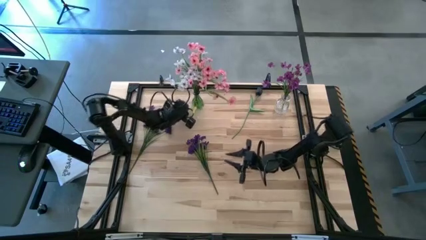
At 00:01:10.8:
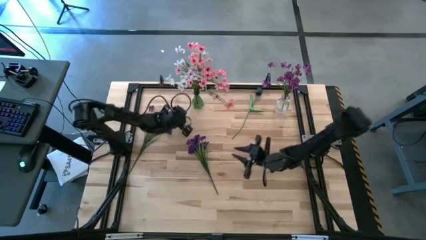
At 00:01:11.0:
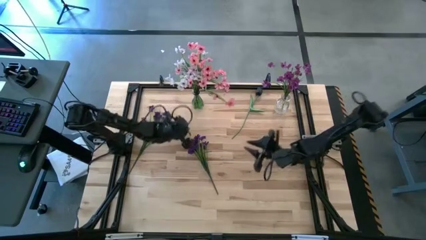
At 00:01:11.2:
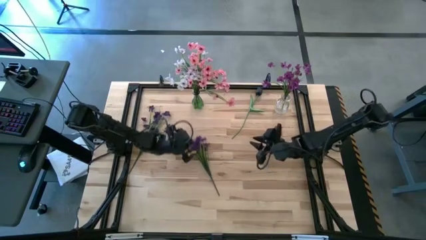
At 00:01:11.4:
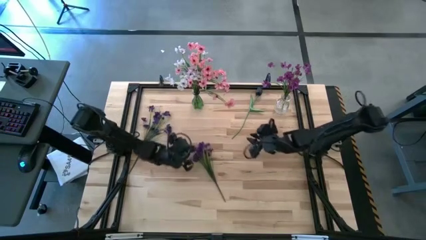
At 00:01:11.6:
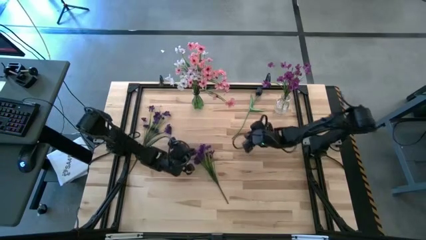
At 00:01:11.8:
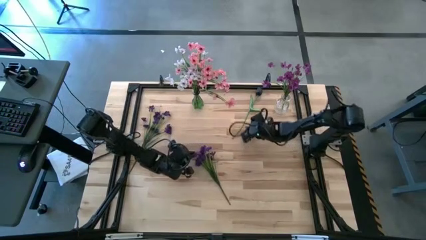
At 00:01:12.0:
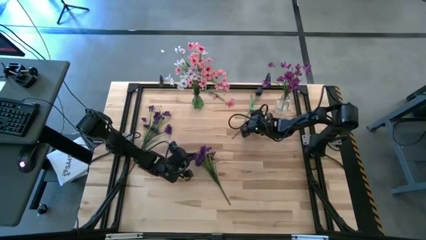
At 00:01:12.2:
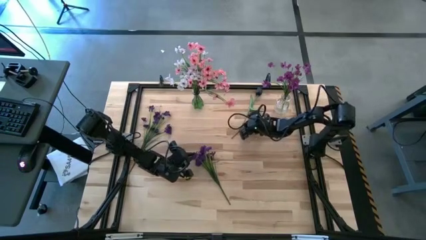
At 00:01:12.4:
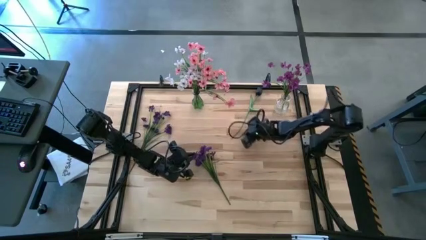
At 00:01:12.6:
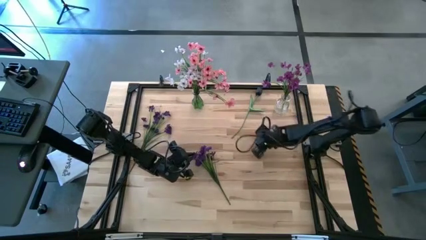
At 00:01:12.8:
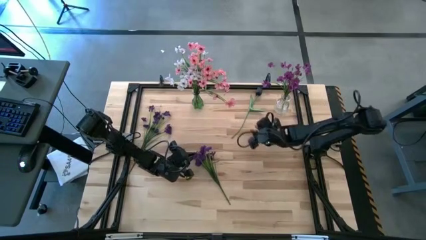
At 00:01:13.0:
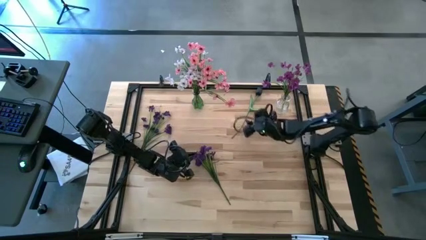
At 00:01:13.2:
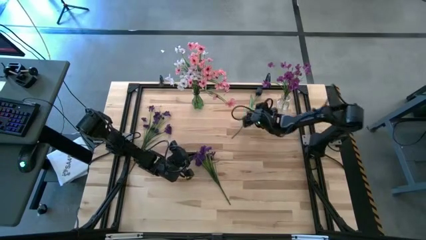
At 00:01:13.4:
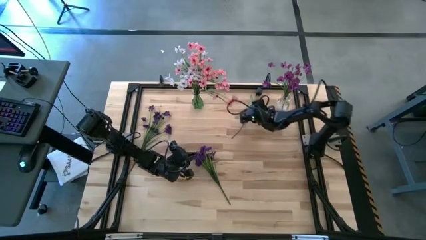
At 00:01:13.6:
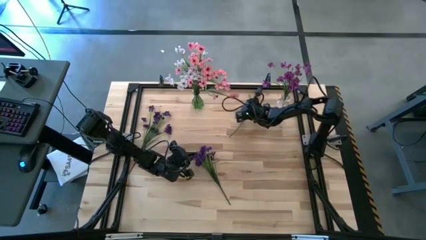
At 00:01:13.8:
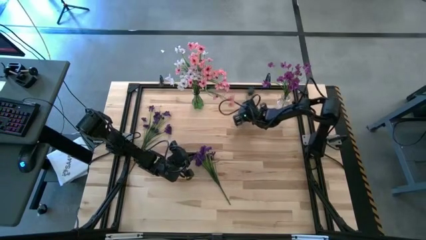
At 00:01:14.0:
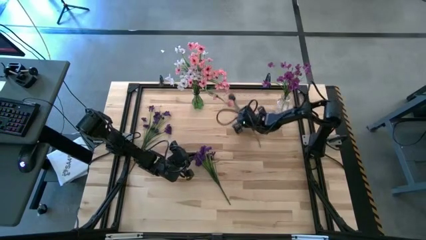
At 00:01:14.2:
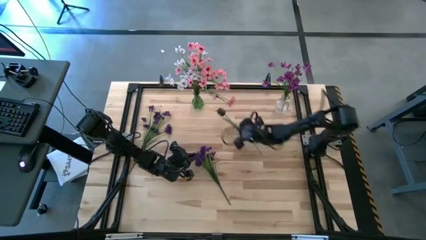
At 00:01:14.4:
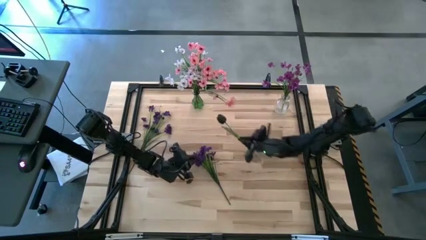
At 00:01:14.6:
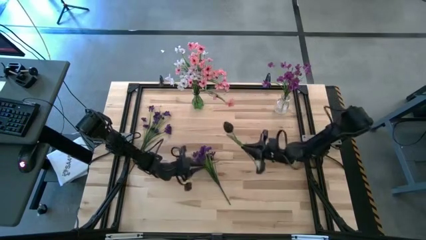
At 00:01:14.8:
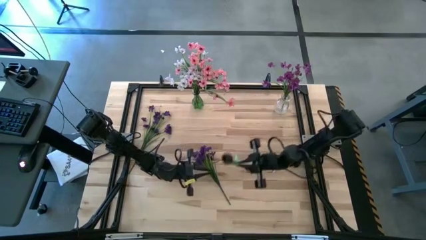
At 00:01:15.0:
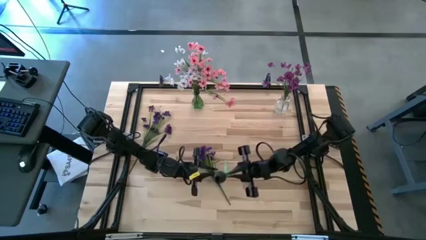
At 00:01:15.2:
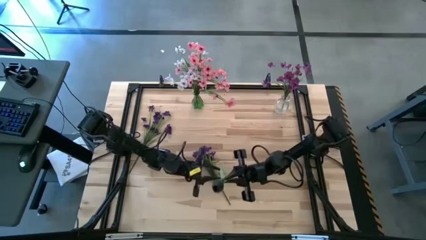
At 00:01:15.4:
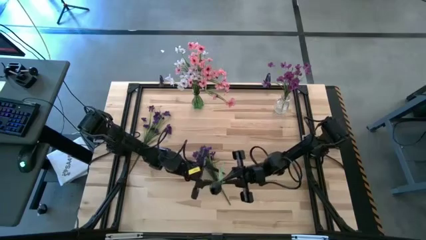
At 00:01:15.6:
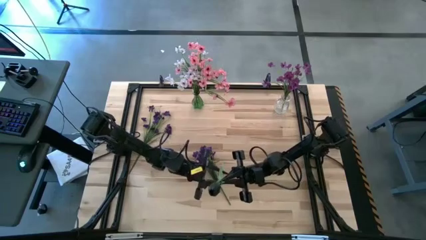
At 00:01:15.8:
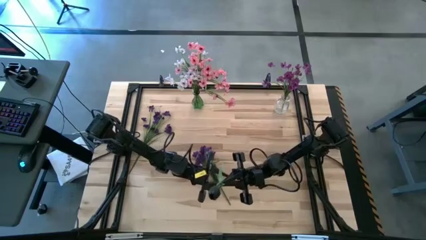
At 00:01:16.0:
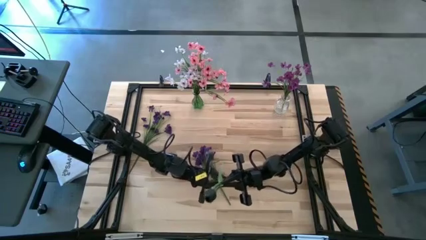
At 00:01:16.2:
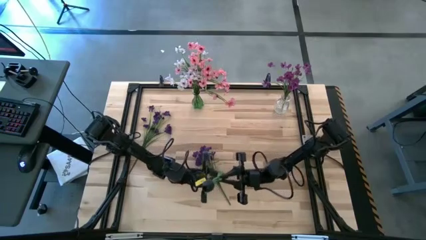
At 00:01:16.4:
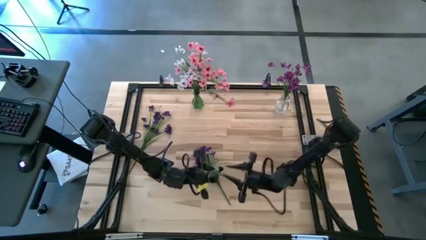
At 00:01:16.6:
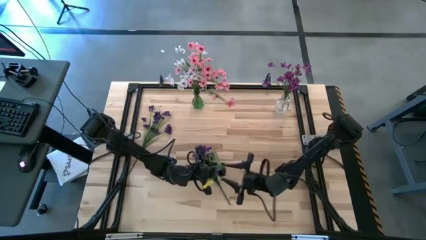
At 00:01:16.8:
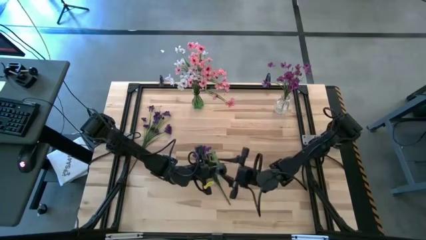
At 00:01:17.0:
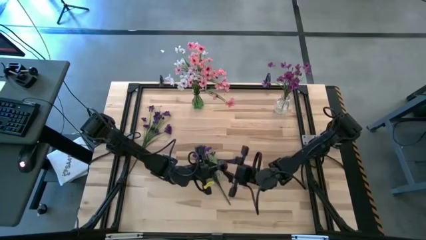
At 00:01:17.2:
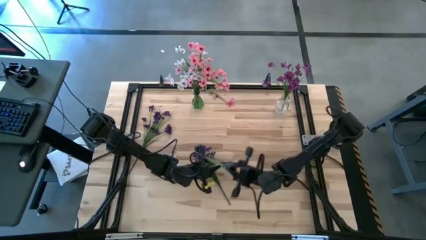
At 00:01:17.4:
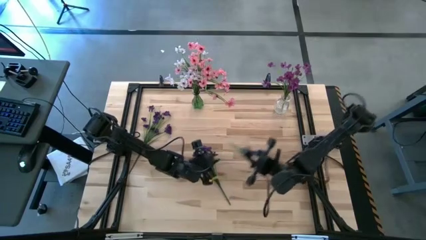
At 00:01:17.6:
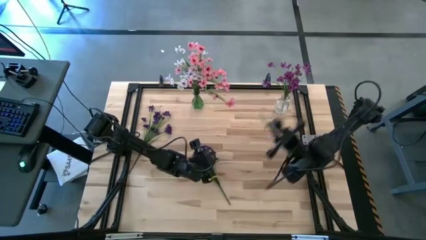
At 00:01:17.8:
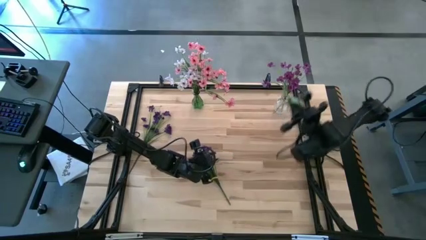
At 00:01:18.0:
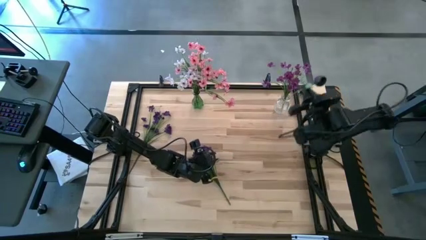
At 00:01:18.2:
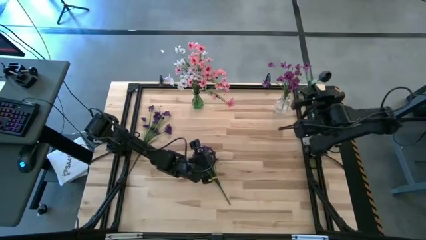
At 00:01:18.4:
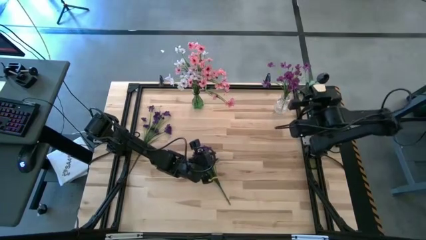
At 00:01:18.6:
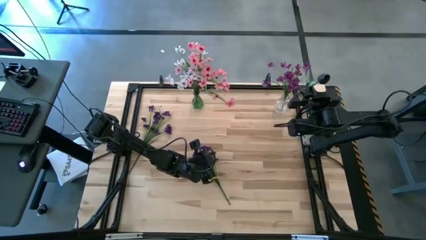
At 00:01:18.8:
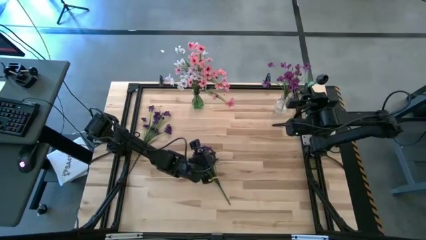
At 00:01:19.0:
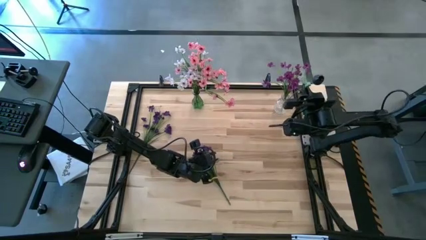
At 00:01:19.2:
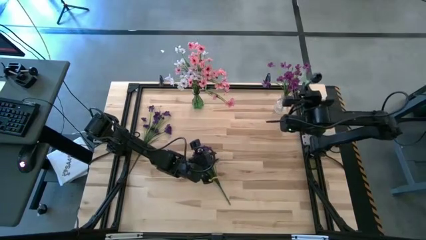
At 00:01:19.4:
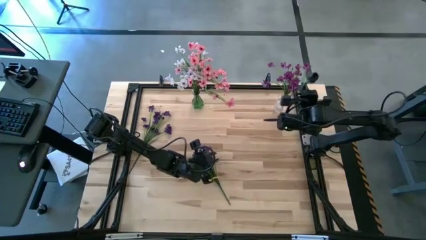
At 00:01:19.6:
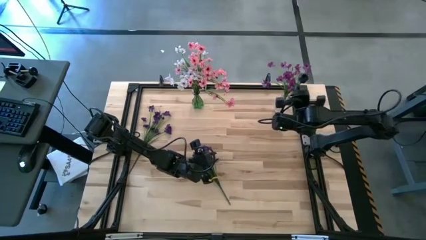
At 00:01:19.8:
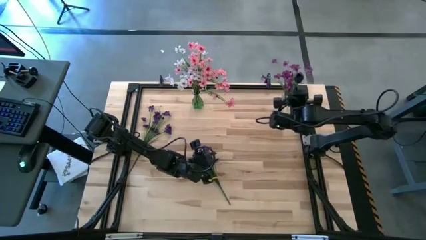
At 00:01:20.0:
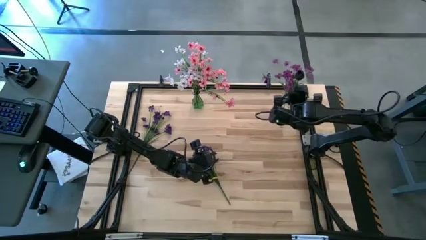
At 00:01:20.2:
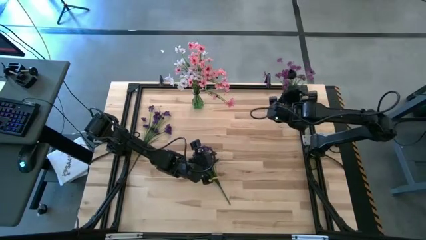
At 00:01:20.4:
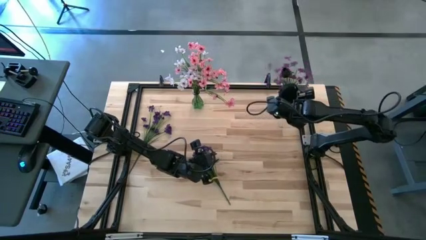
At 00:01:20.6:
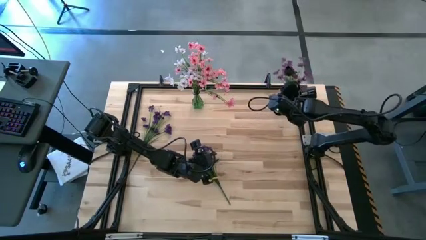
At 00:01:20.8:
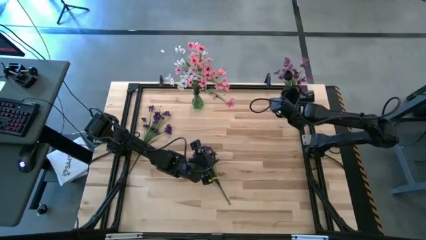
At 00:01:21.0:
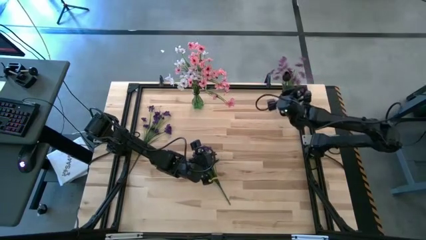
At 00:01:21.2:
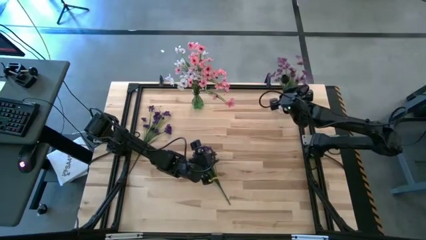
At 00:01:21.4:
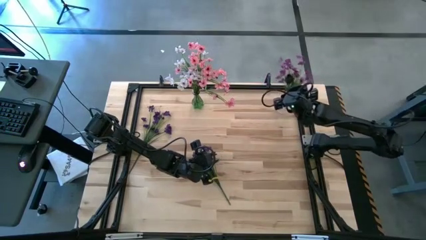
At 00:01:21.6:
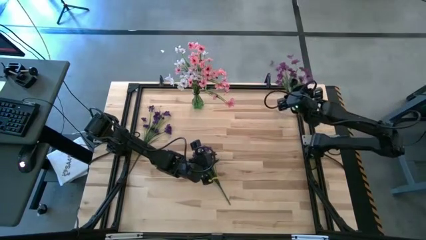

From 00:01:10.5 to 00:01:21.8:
Task: Sort flowers into vase by color
Put the right black flowers into the transparent vase
